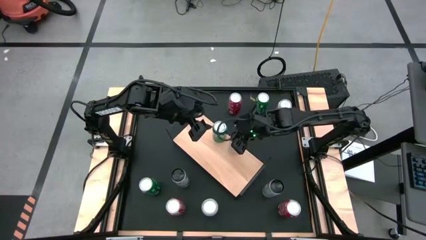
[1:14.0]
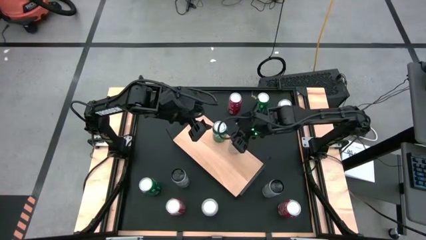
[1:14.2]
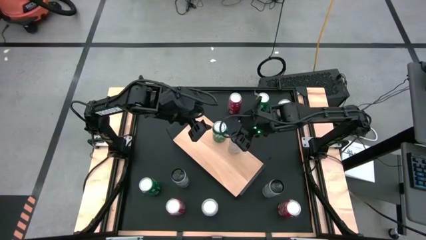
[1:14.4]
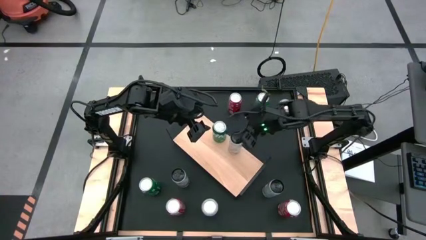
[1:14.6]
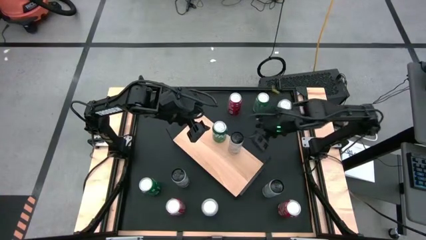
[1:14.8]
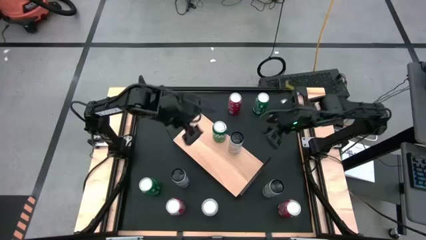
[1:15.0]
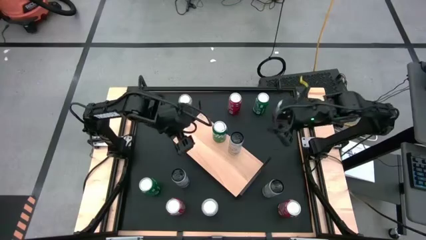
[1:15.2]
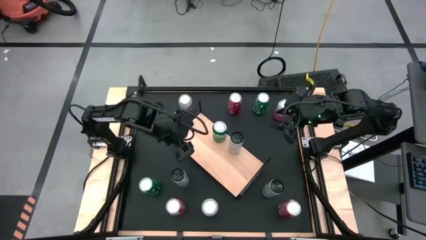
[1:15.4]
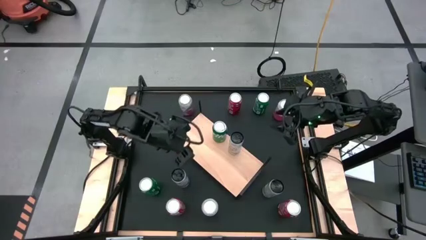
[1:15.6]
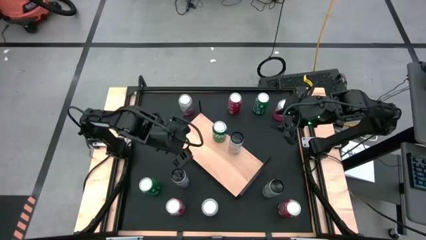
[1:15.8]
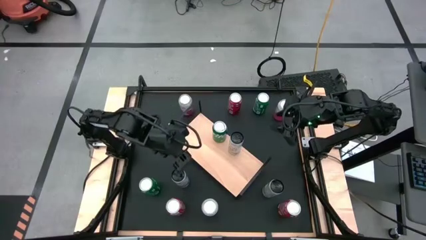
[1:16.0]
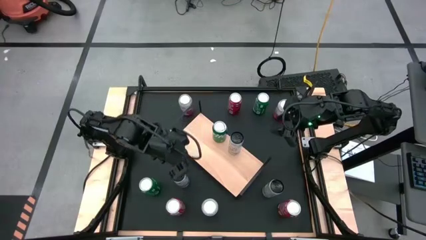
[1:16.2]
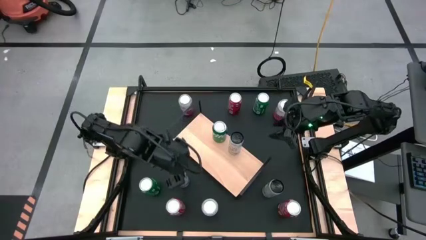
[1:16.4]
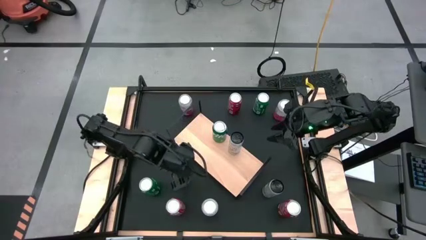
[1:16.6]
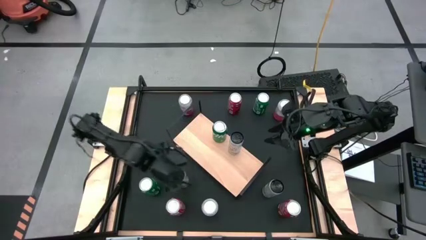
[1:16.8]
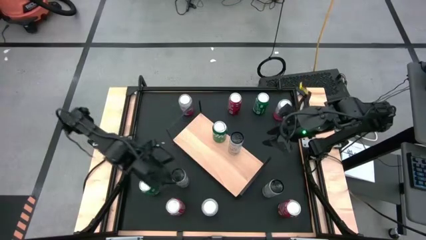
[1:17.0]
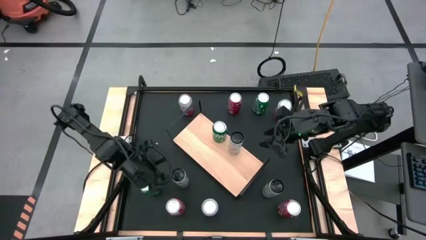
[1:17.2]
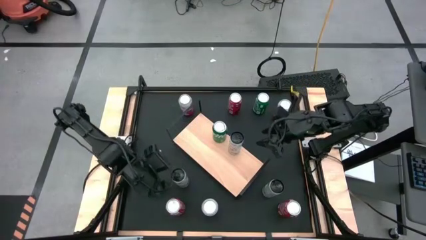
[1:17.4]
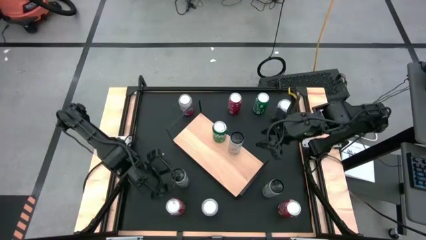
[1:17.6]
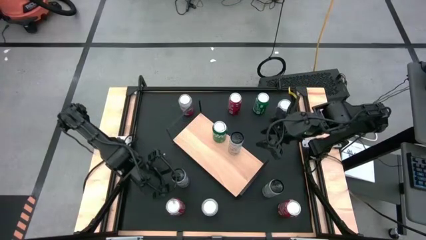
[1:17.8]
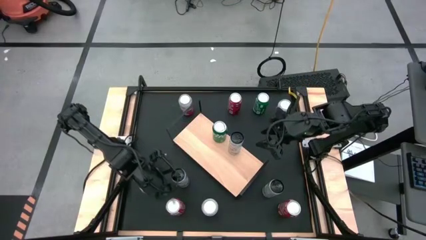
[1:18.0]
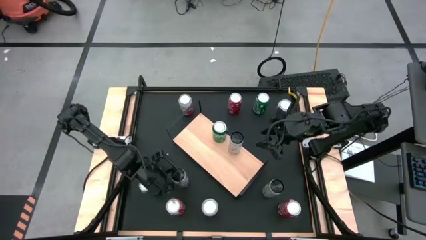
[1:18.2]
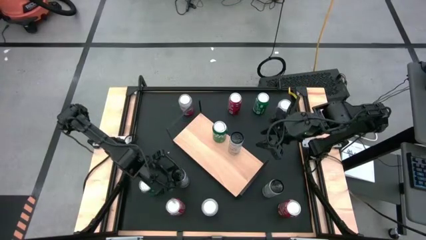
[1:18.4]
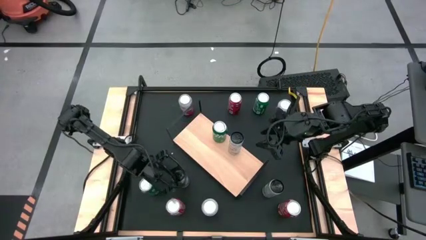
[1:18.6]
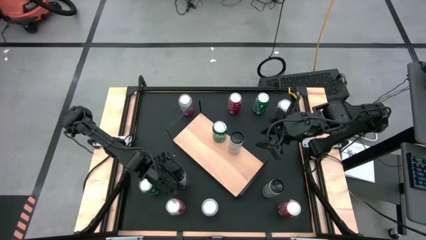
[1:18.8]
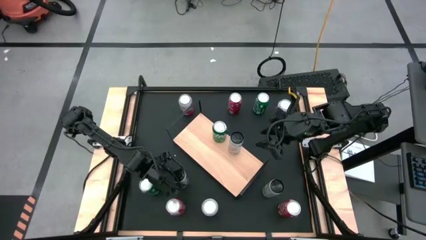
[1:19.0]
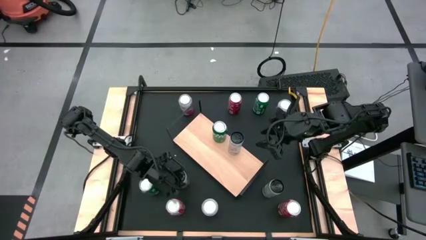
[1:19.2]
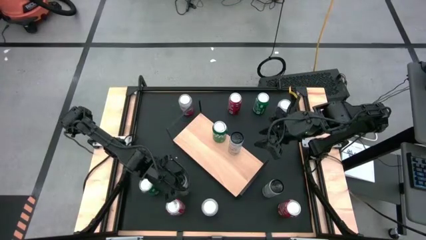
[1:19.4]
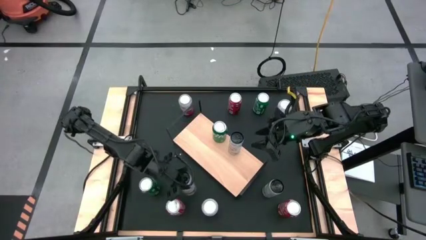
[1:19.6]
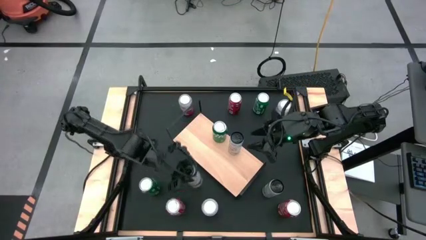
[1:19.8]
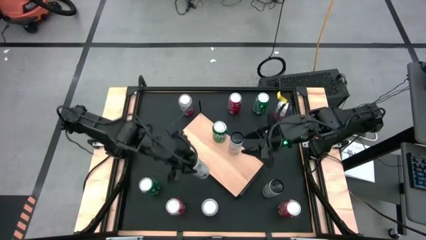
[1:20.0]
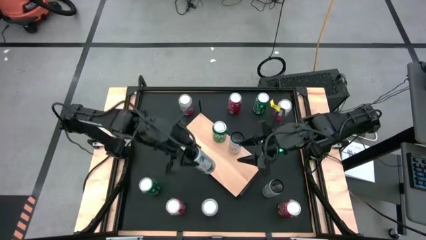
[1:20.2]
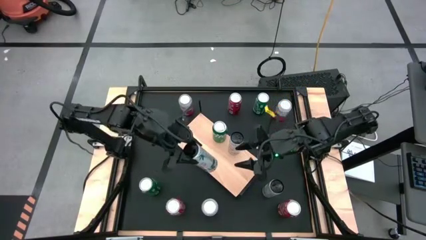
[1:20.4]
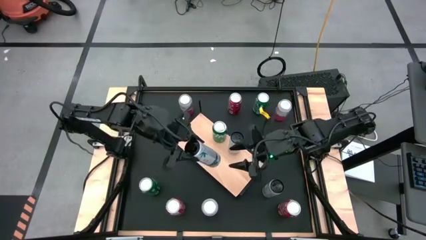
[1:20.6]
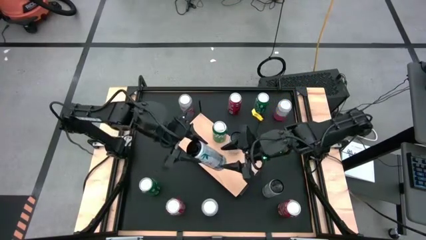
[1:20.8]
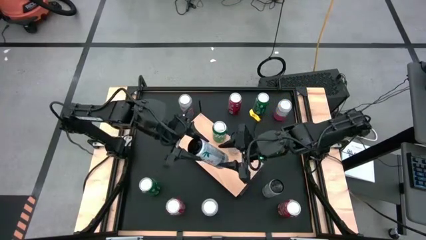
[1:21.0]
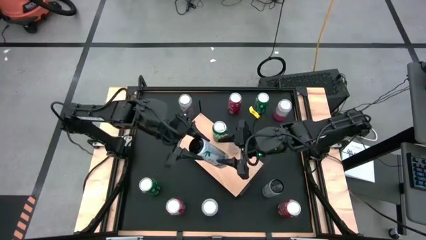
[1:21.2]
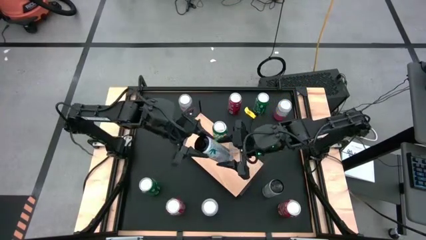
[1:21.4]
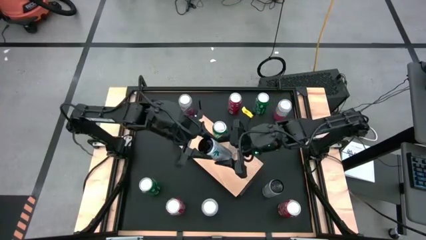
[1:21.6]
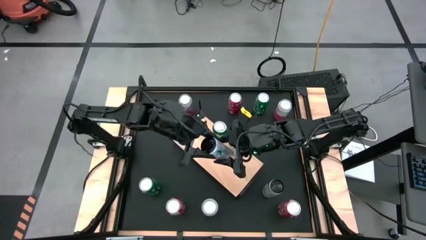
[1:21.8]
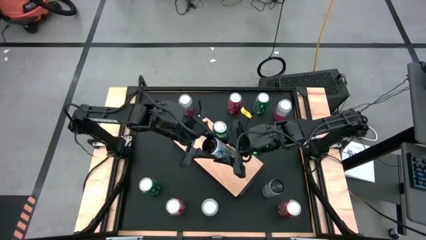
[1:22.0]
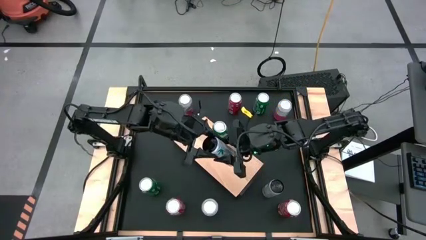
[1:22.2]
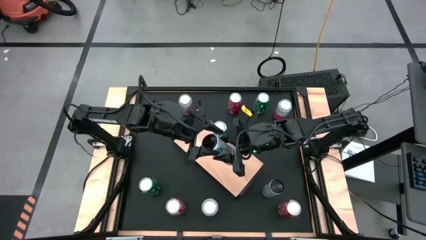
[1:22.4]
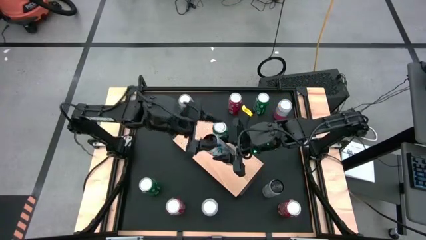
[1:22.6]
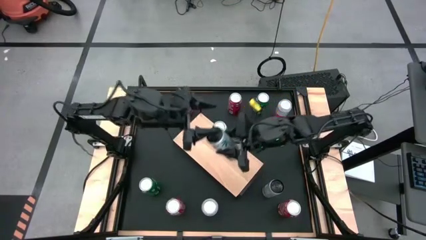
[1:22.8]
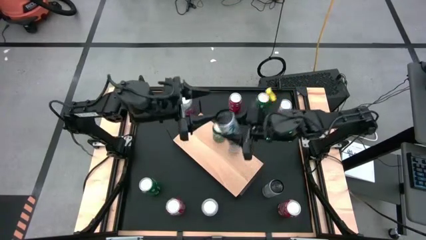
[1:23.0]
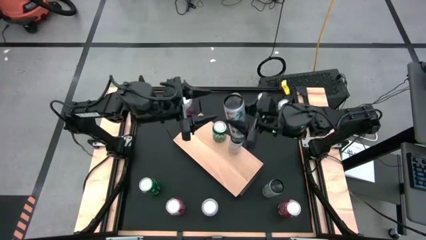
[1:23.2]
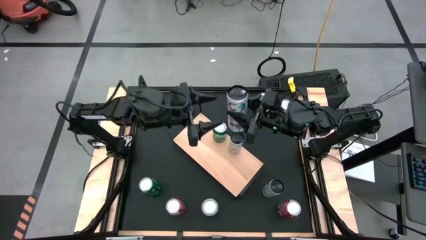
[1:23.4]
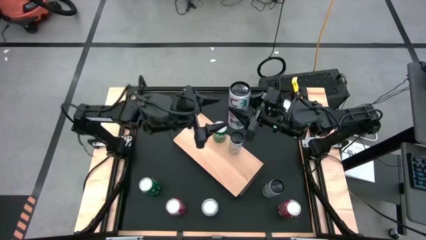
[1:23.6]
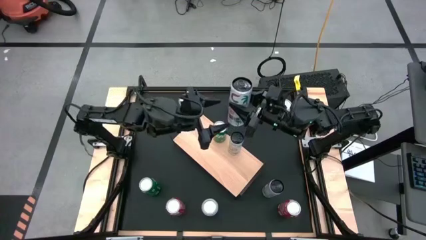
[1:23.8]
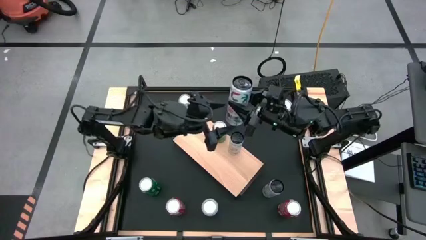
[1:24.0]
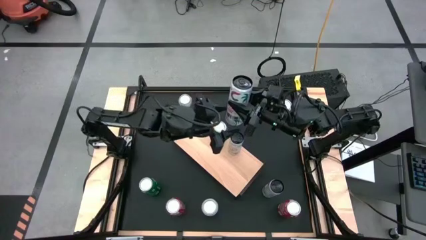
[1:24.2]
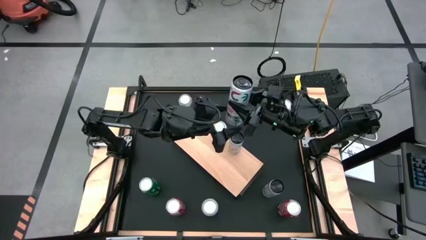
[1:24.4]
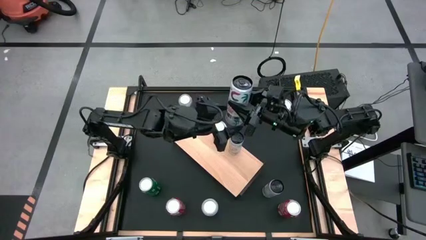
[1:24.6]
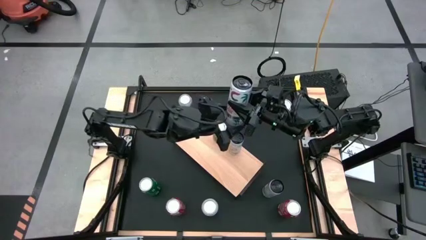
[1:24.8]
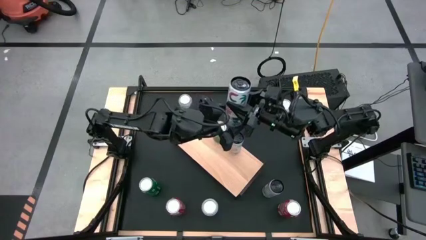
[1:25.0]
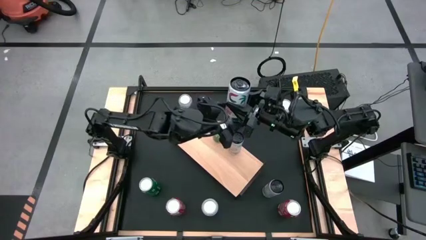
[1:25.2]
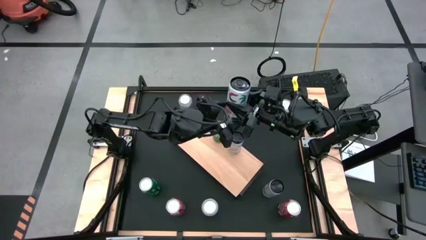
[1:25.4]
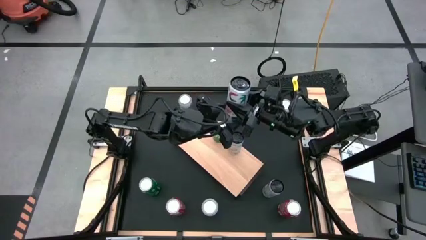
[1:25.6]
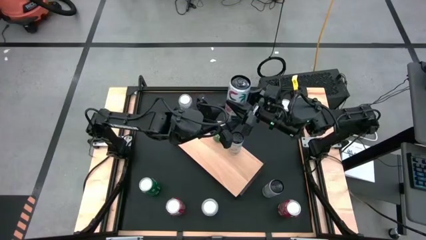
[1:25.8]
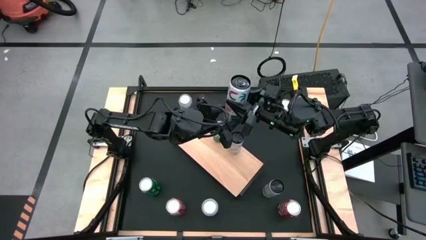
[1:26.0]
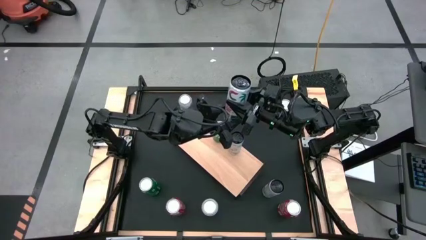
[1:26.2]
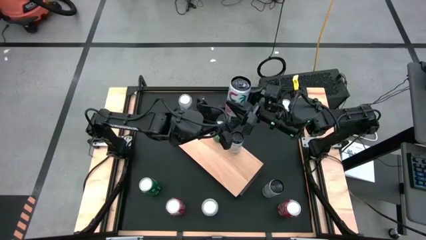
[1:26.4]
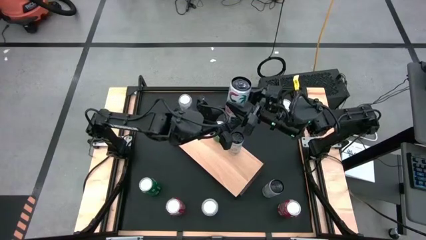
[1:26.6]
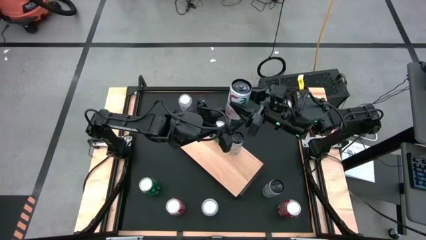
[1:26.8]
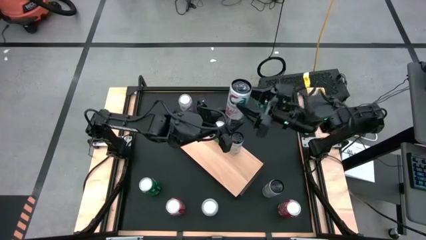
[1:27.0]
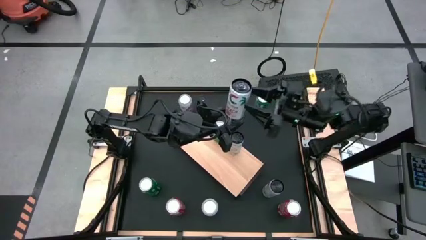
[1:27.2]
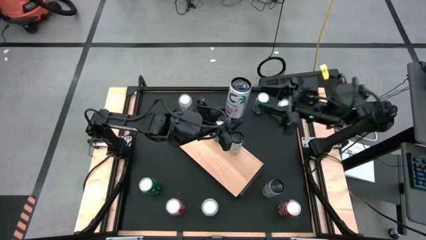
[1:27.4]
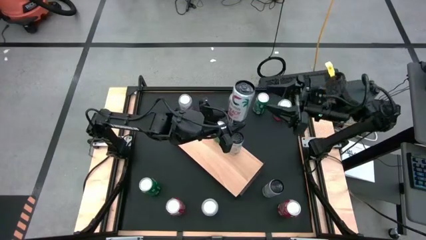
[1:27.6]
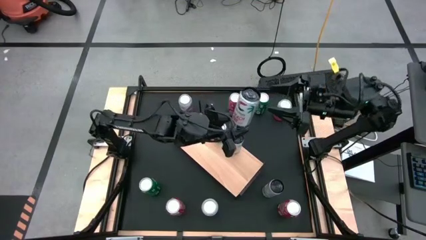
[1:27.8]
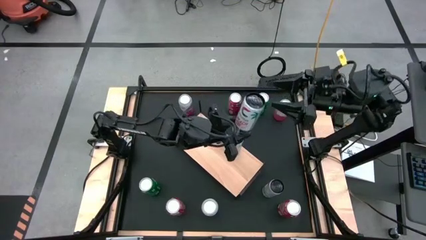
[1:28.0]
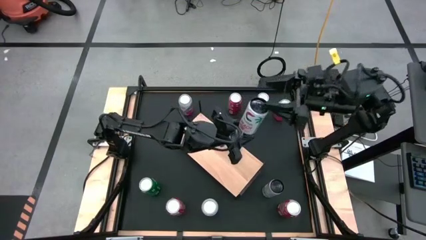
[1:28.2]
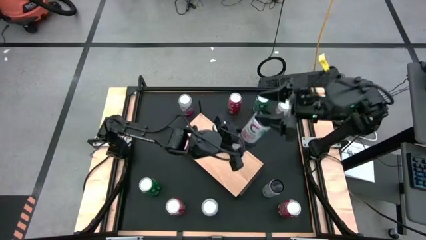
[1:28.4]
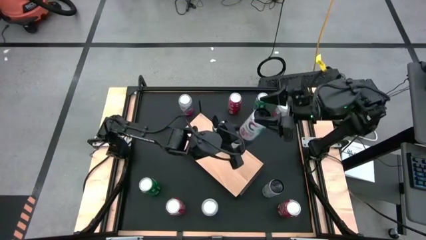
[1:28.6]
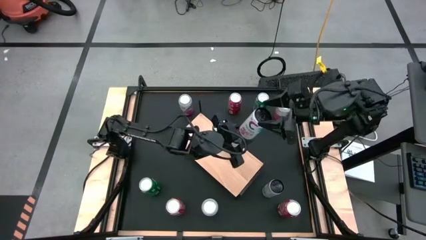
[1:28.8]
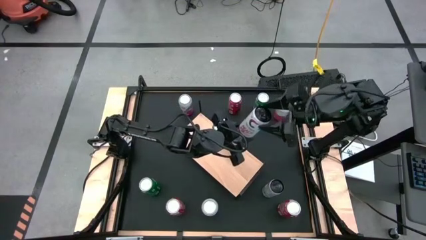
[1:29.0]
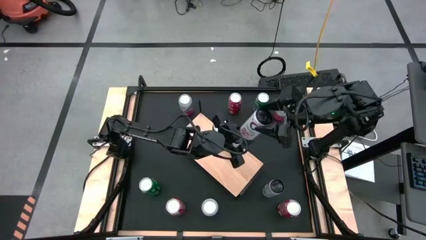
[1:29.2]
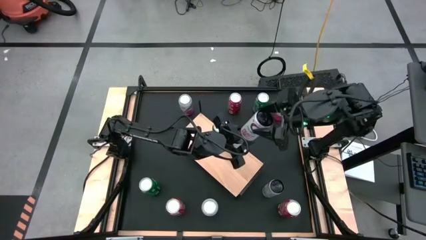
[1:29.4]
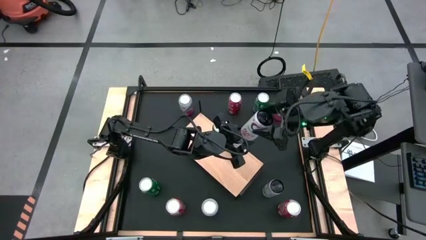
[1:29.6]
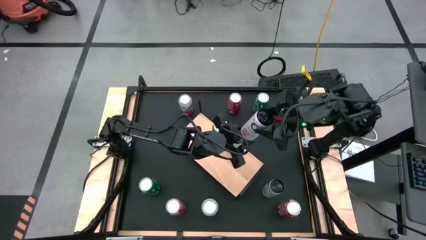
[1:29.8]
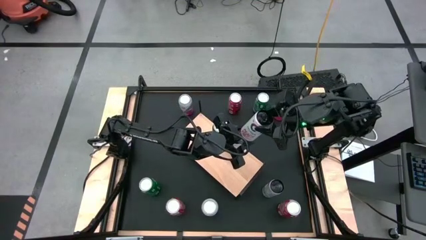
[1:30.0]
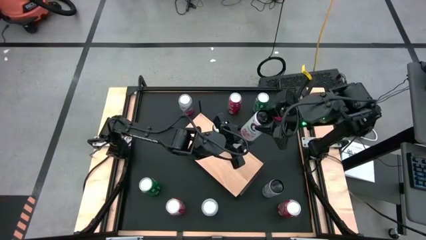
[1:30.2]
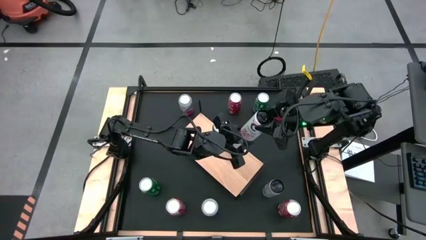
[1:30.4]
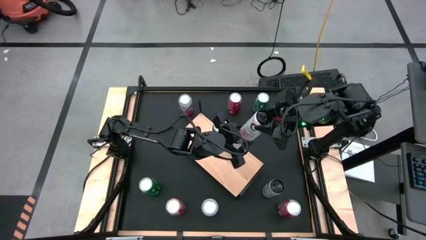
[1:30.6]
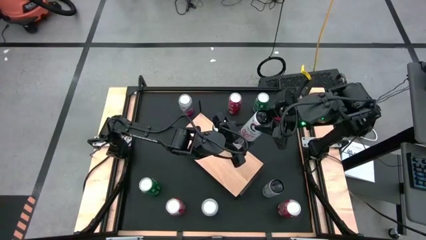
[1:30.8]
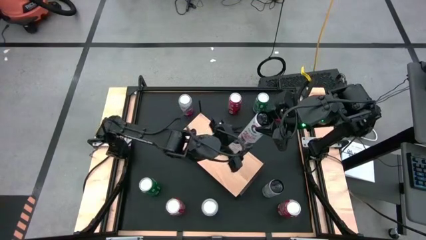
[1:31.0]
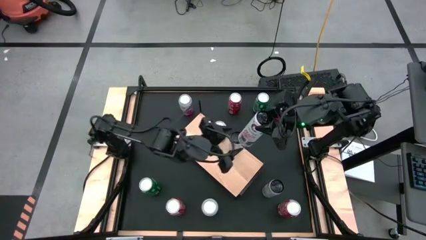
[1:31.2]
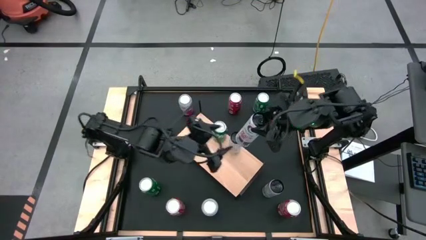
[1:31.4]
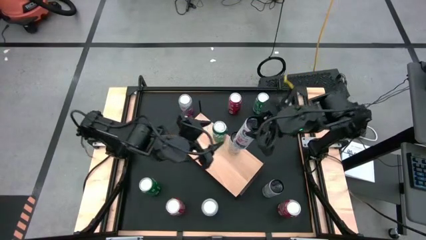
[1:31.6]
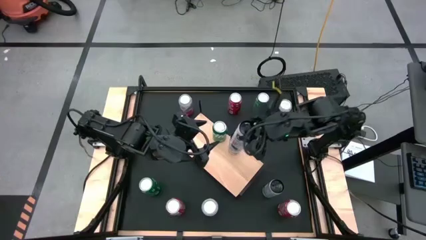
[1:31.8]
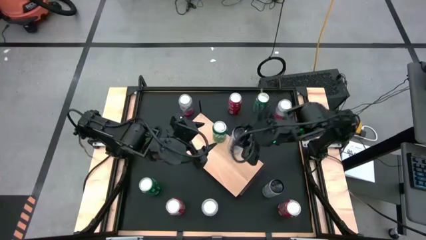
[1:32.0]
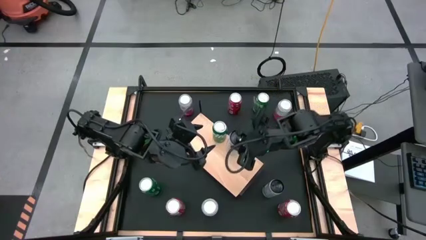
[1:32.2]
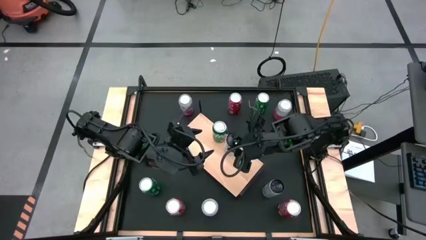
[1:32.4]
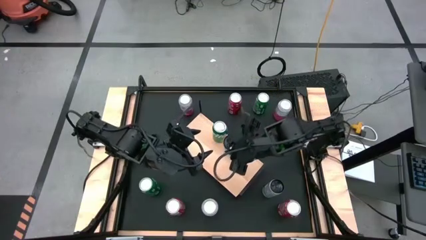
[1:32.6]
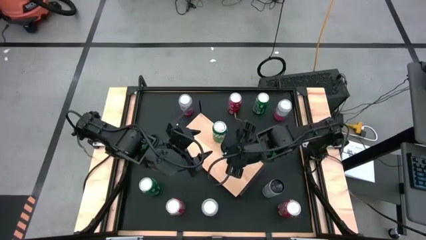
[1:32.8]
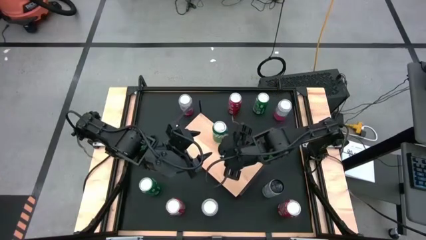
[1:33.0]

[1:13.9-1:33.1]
Task: Place canned beverage on shelf
Put the left white soda can aligned with the other white soda can
